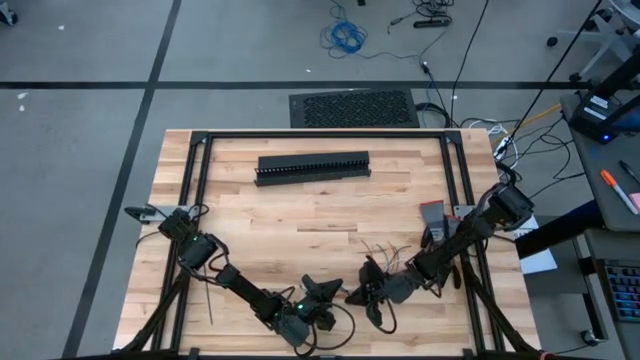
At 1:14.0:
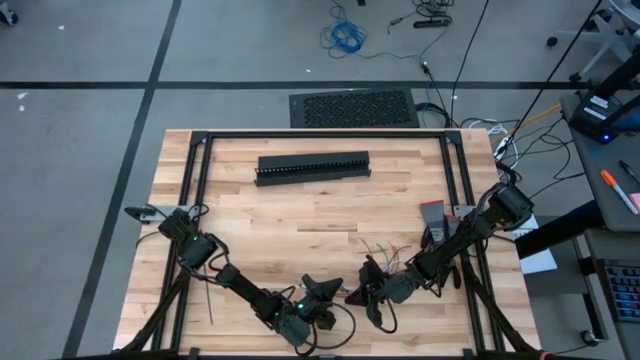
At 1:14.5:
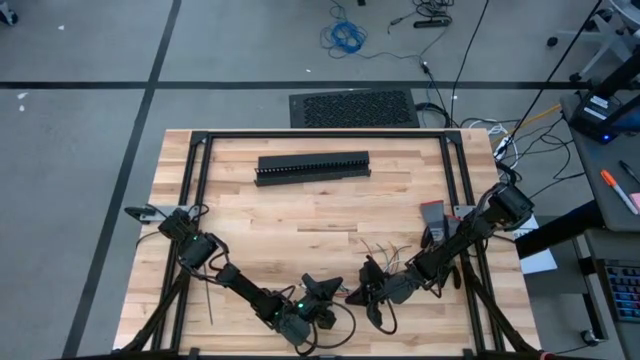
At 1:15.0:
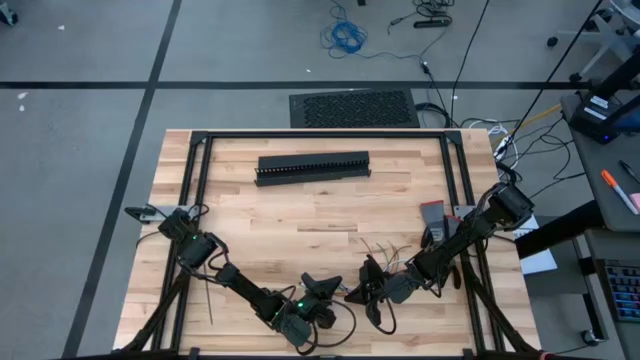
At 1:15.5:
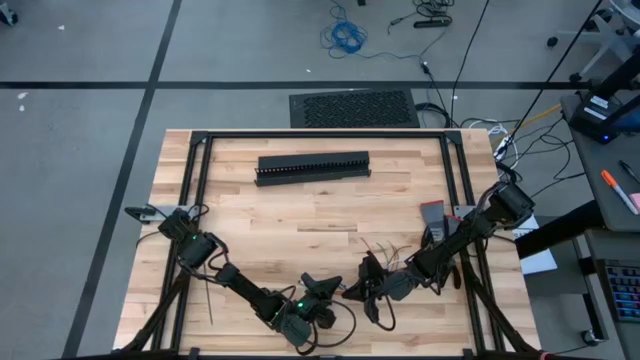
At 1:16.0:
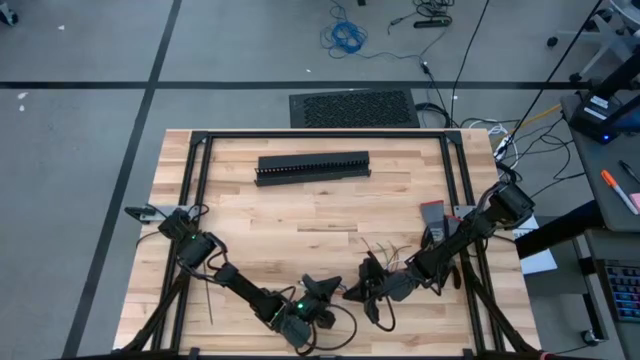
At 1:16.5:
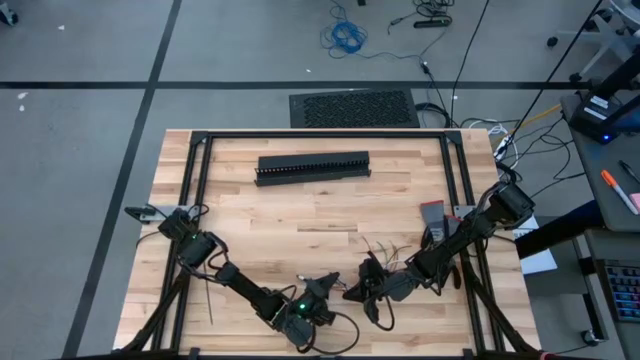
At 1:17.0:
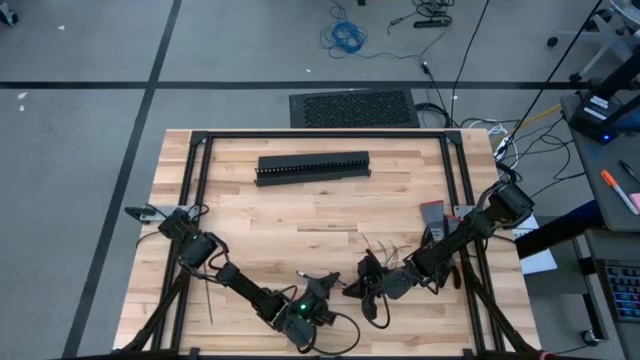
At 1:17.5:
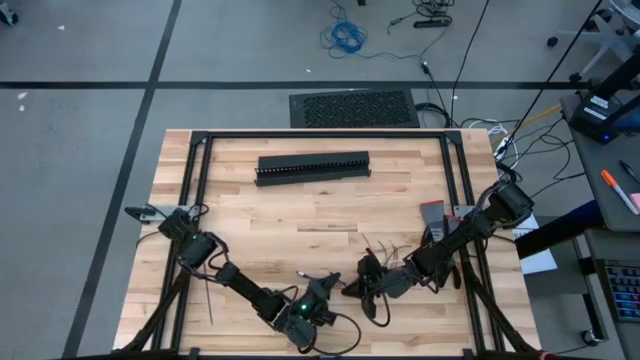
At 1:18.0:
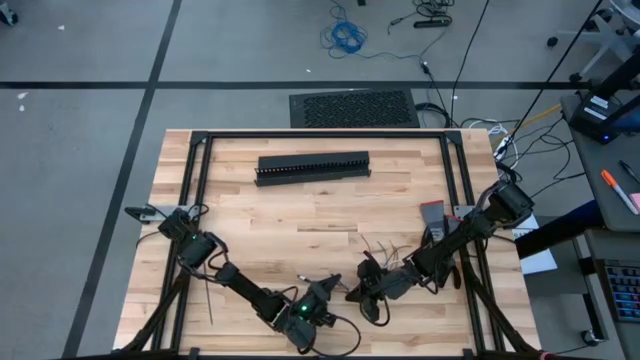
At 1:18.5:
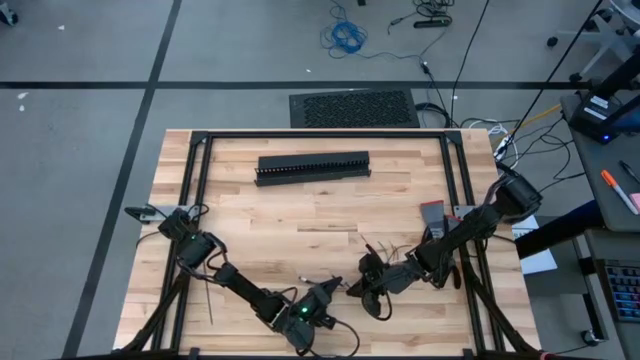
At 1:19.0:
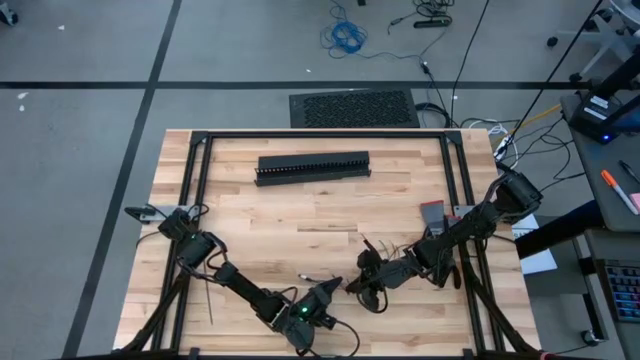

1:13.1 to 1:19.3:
Task: Ziptie cables
Wrap the cable wires with the black zip tie

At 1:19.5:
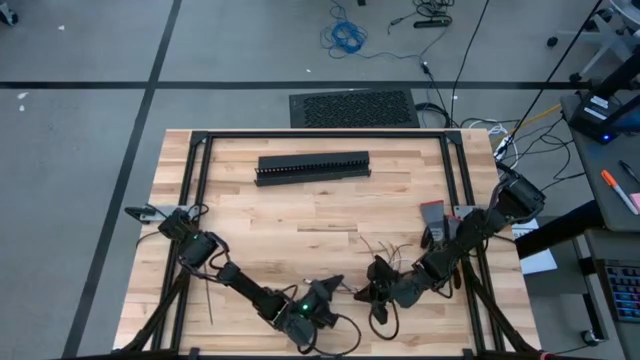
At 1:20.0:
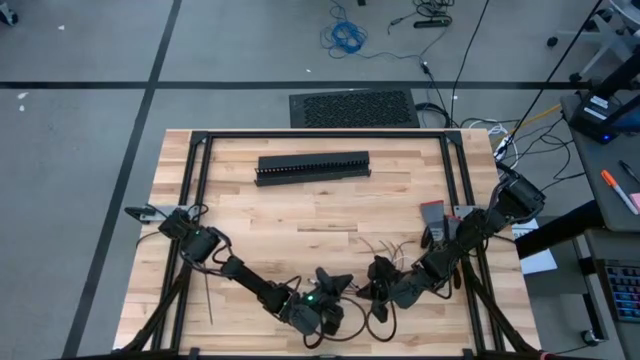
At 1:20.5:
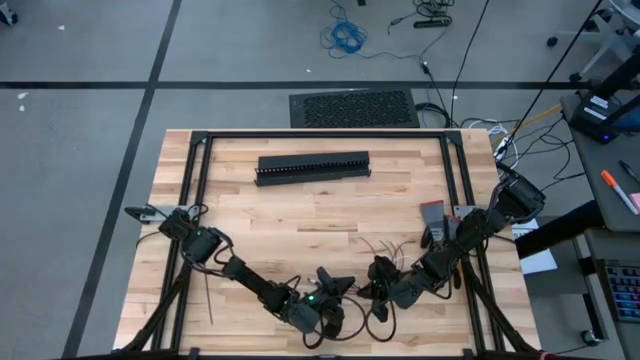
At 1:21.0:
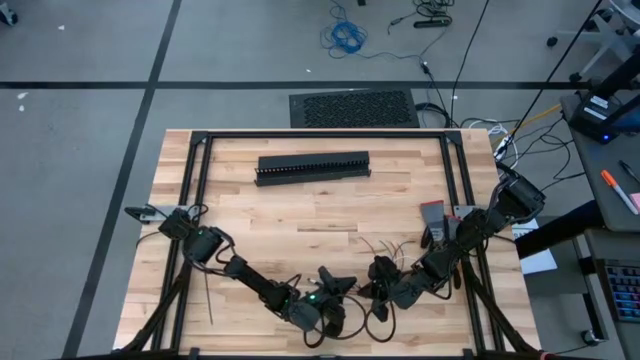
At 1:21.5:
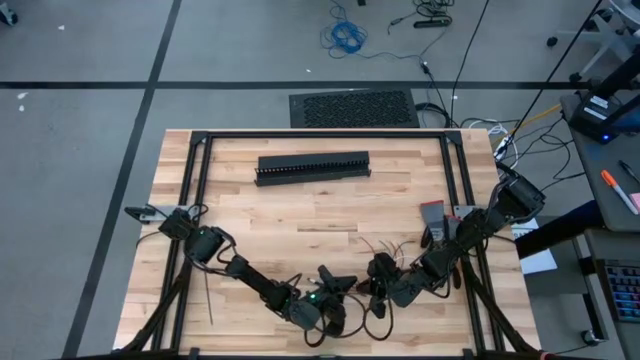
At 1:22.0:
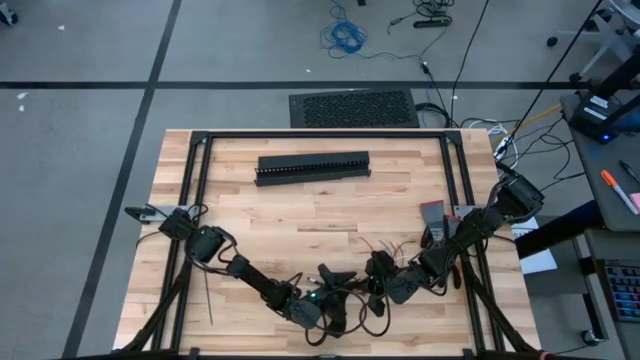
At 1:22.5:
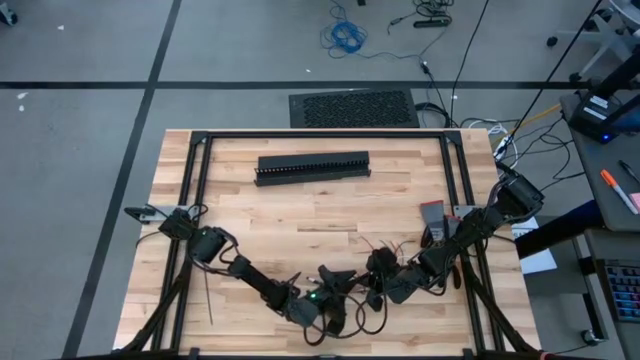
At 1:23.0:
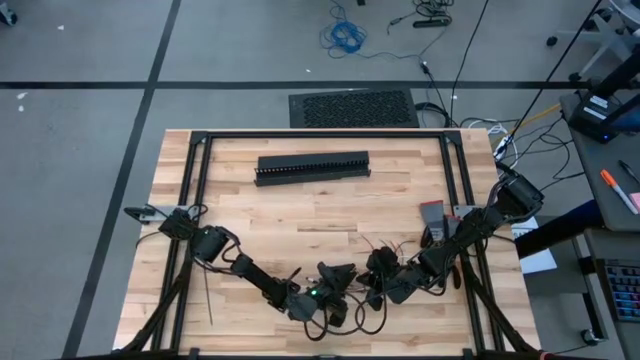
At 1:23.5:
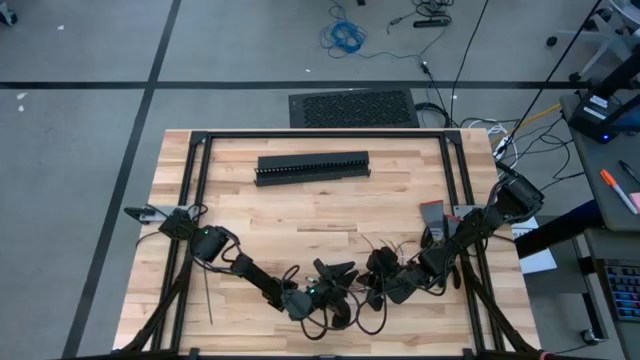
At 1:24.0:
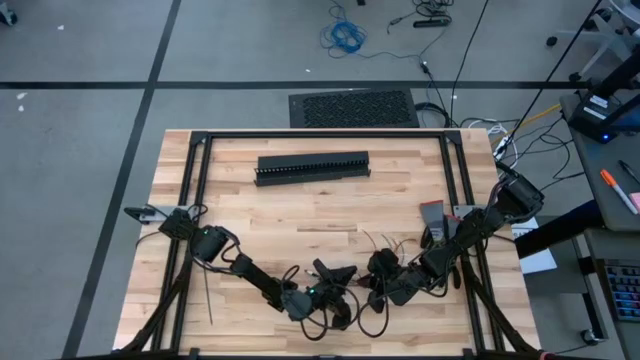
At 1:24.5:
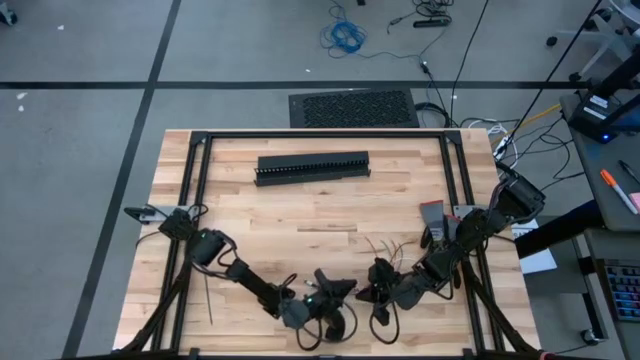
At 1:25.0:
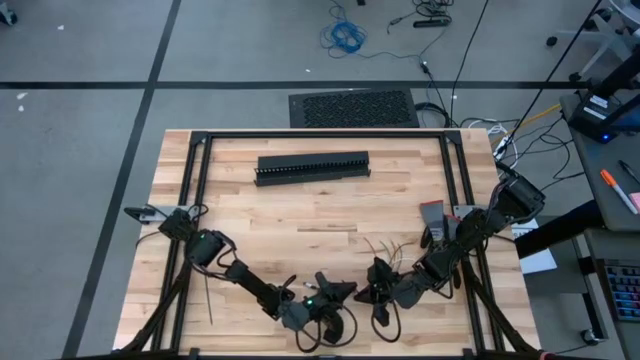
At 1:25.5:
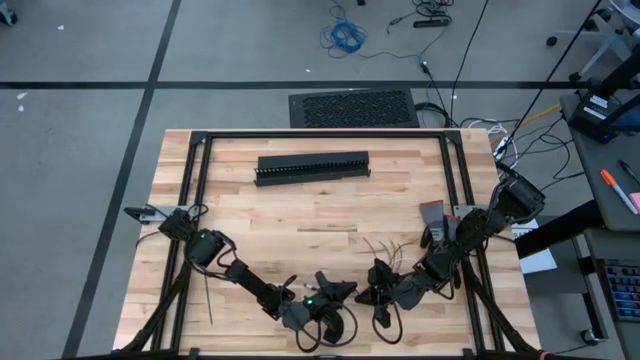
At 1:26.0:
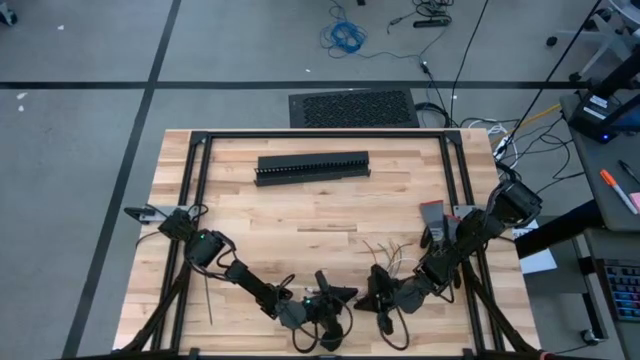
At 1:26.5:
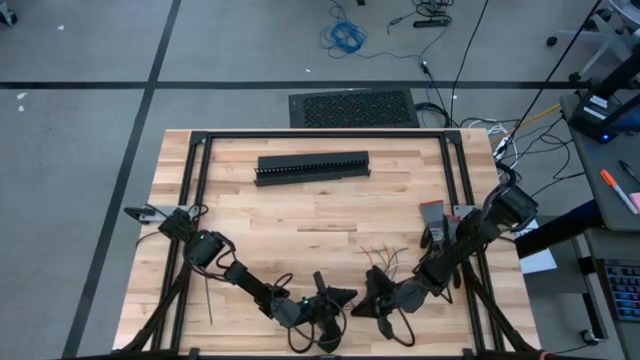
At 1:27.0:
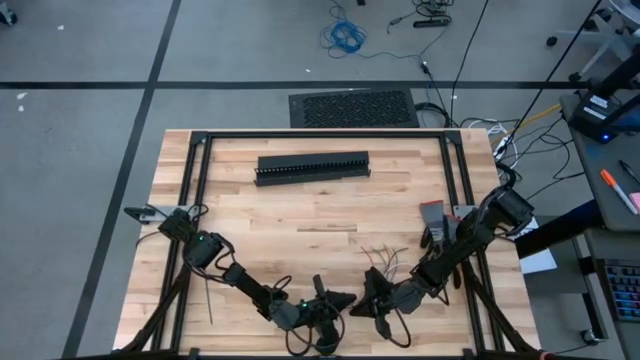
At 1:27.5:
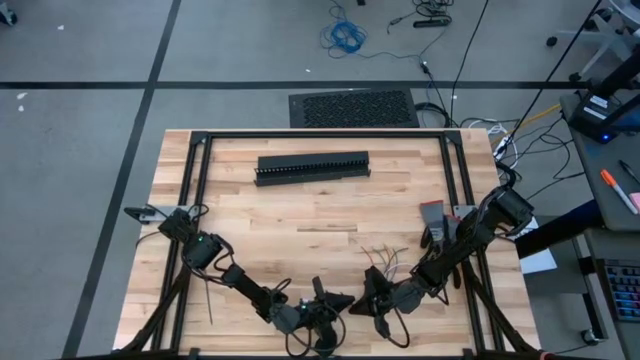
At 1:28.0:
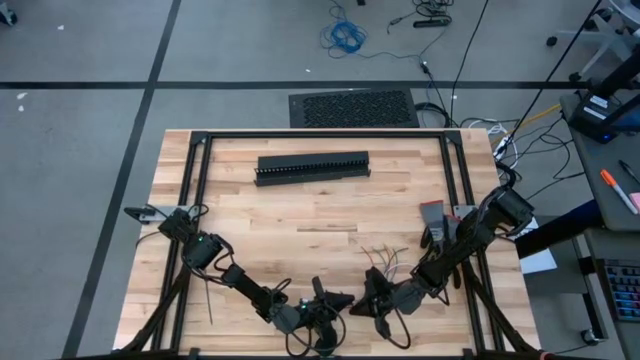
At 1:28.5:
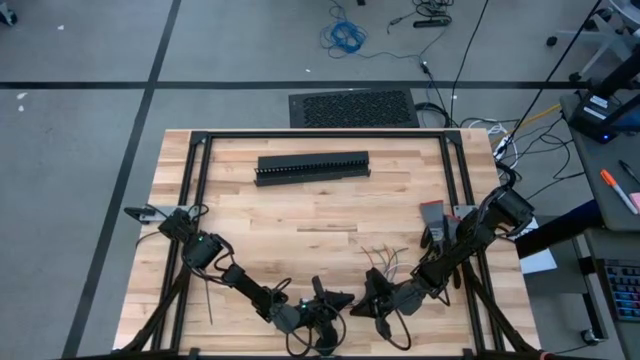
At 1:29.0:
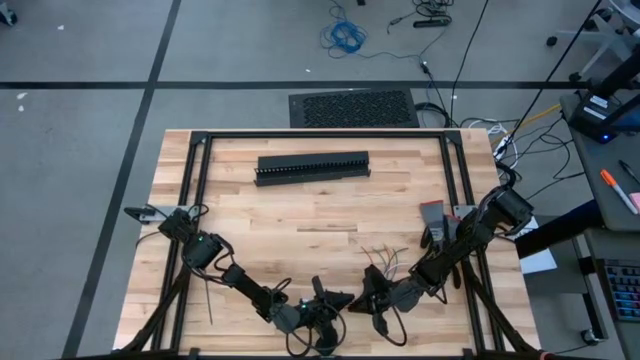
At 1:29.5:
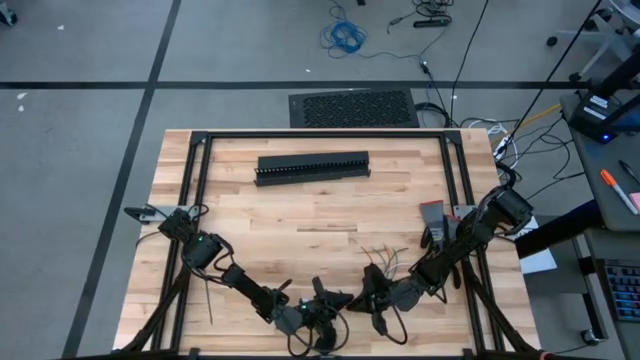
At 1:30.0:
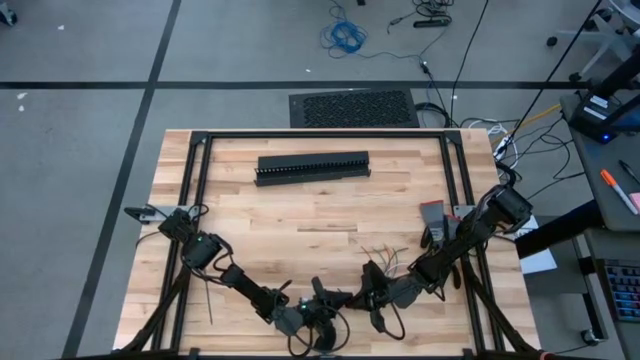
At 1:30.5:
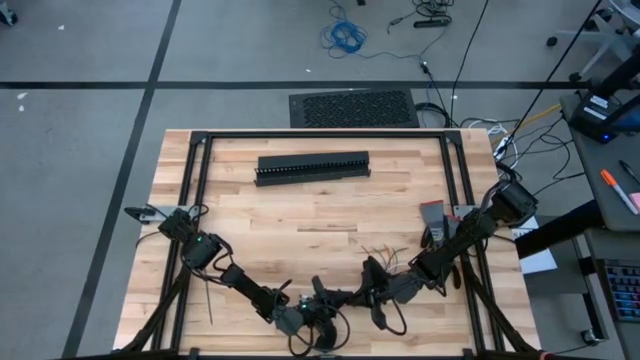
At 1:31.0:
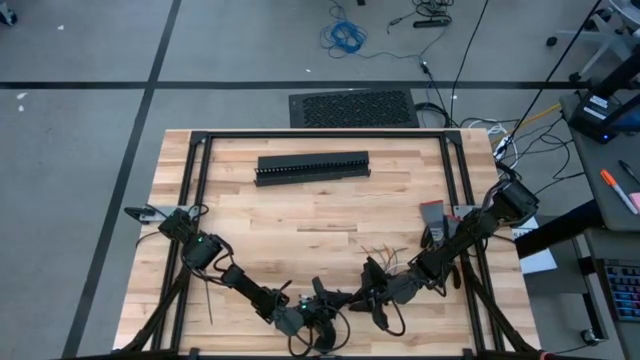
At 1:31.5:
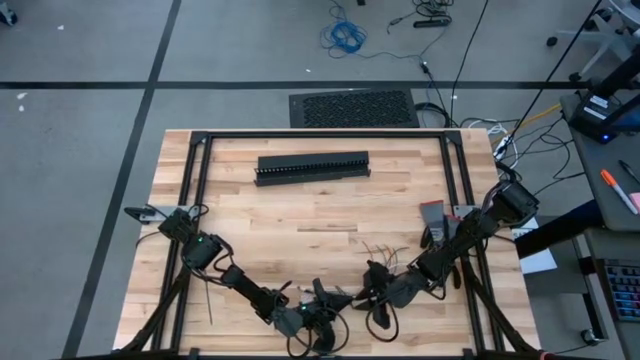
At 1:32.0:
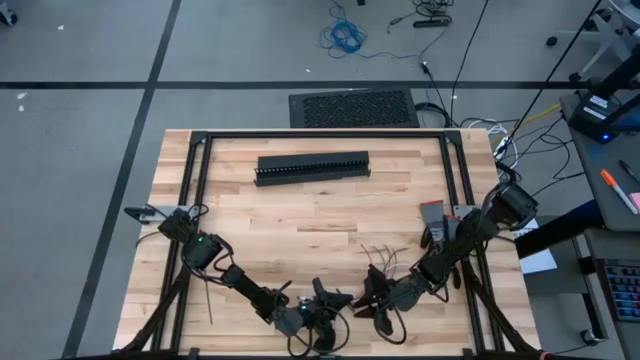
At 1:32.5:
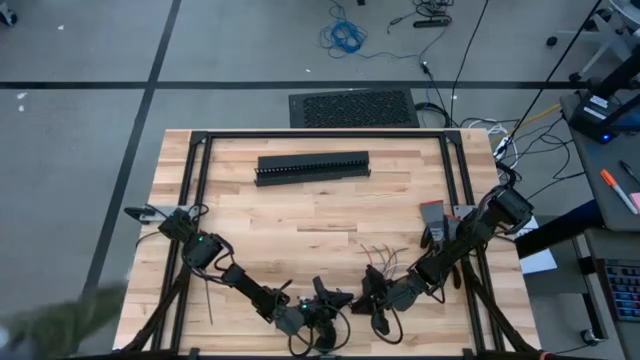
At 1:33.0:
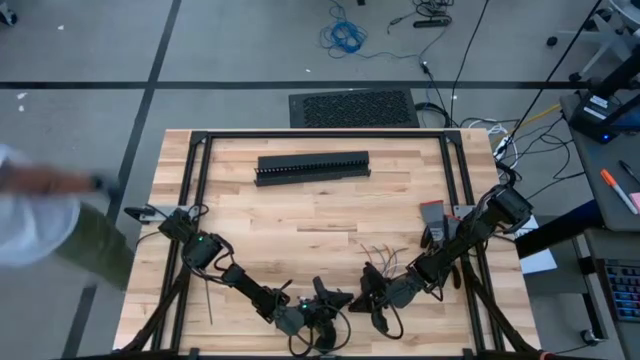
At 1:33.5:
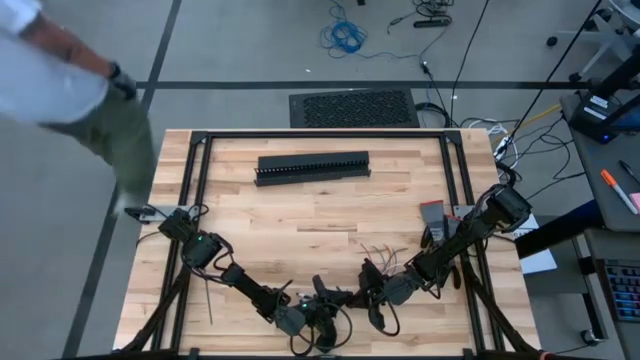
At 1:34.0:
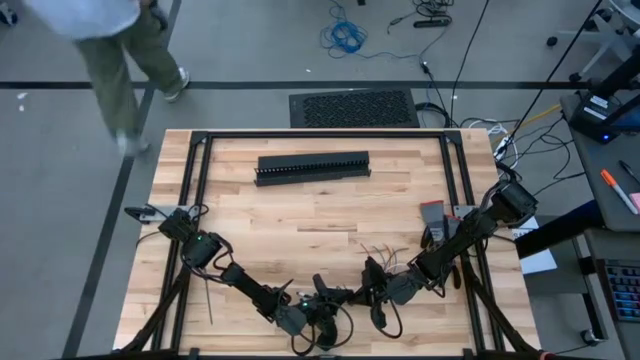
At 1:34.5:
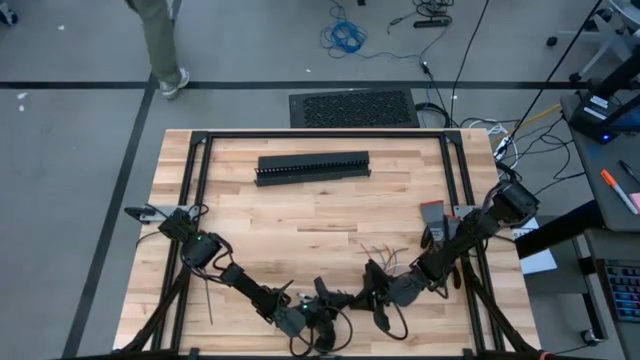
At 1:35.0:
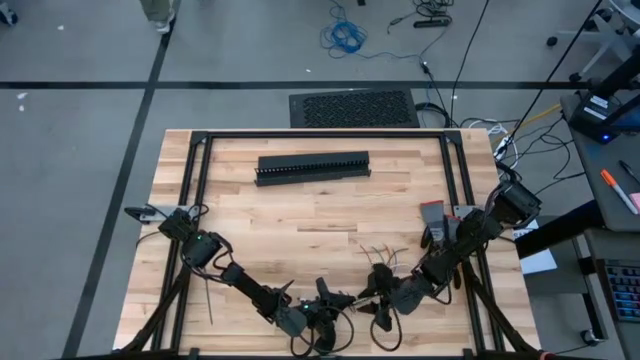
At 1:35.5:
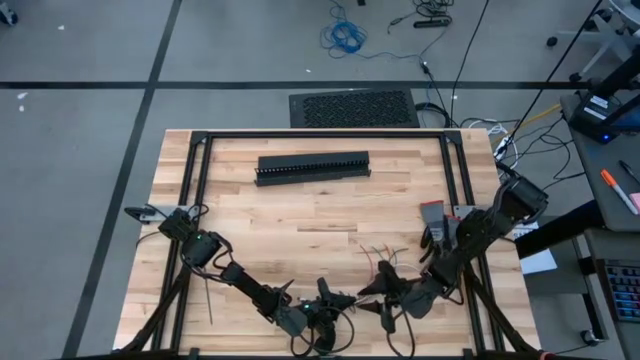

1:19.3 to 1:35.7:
Wrap the cable wires with the black zip tie
